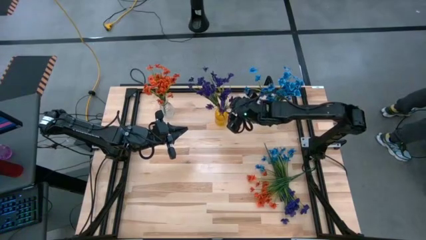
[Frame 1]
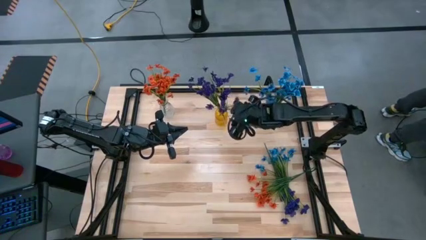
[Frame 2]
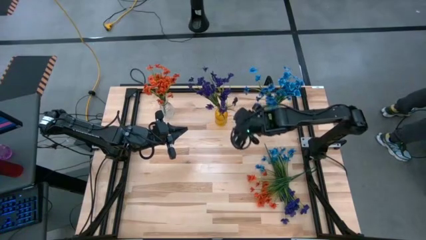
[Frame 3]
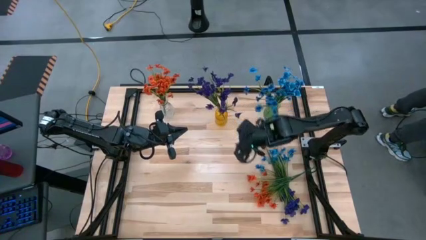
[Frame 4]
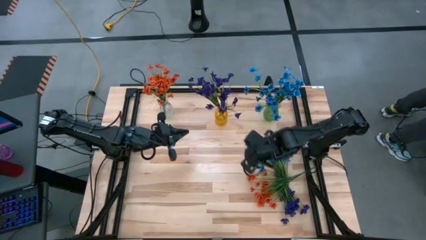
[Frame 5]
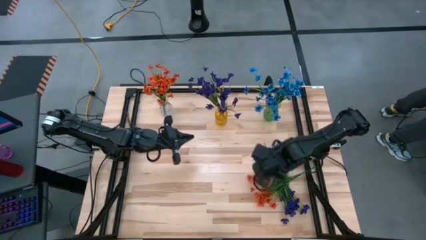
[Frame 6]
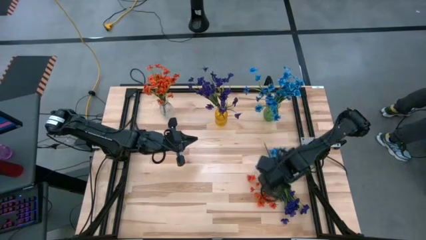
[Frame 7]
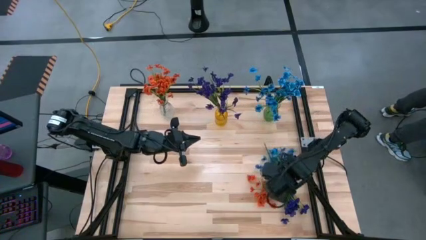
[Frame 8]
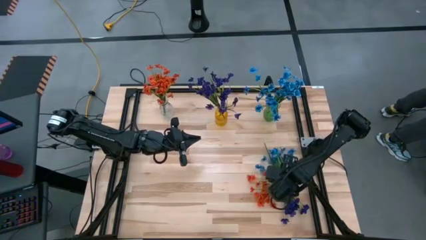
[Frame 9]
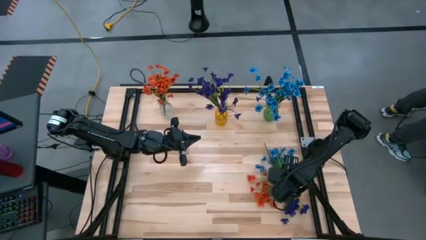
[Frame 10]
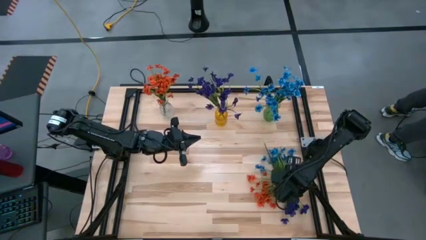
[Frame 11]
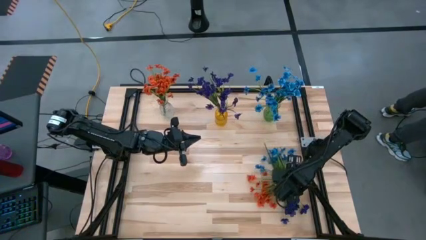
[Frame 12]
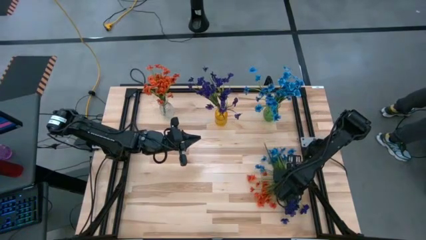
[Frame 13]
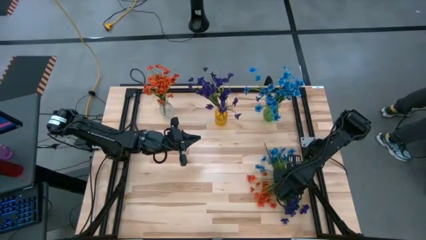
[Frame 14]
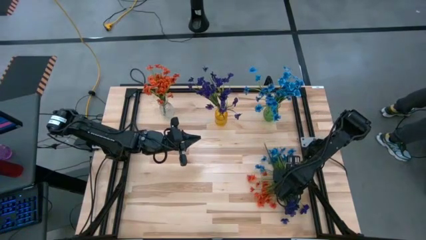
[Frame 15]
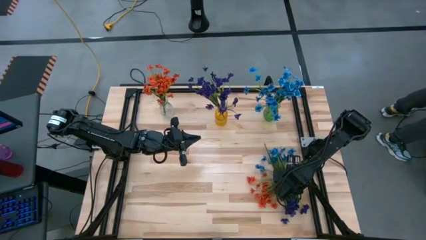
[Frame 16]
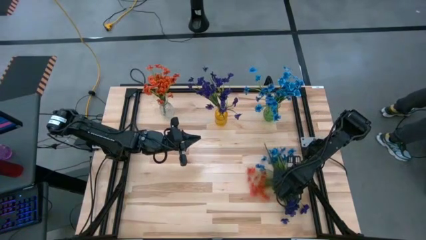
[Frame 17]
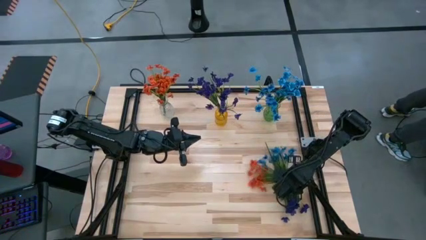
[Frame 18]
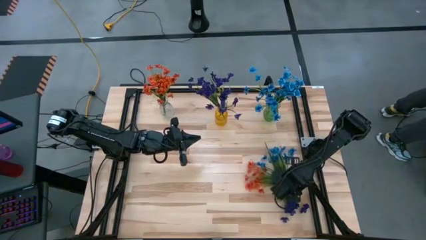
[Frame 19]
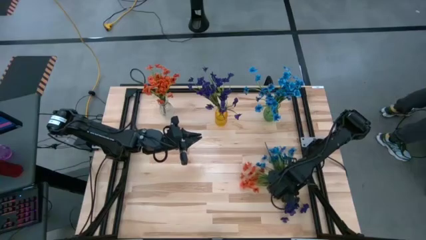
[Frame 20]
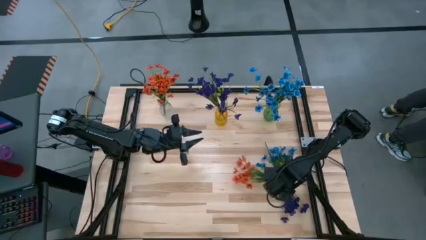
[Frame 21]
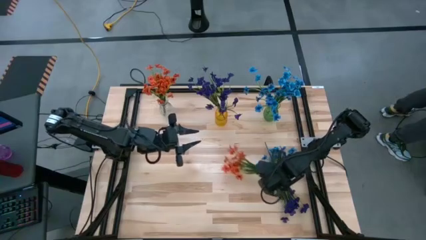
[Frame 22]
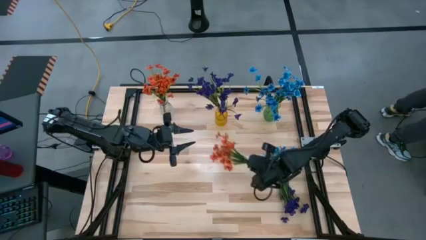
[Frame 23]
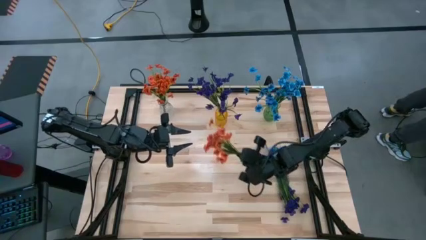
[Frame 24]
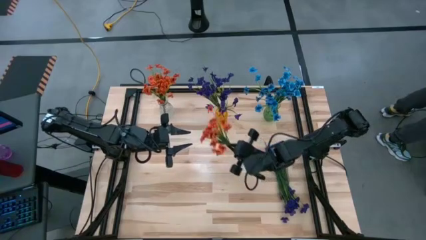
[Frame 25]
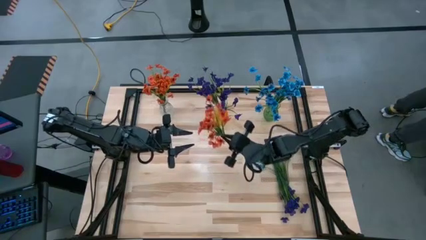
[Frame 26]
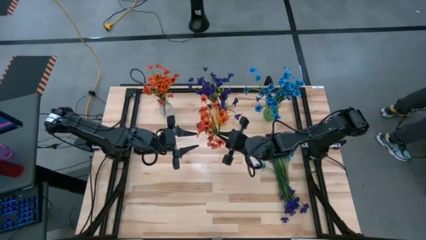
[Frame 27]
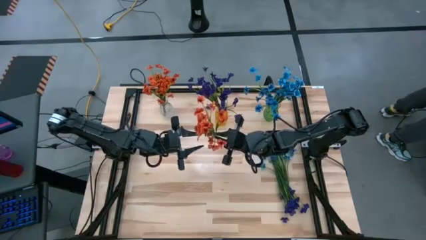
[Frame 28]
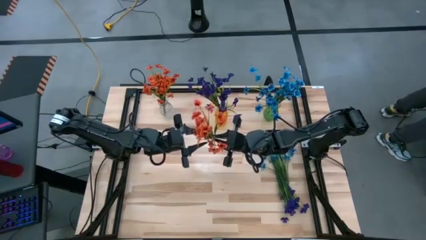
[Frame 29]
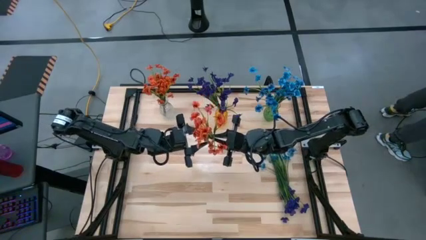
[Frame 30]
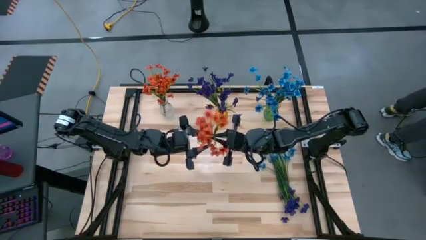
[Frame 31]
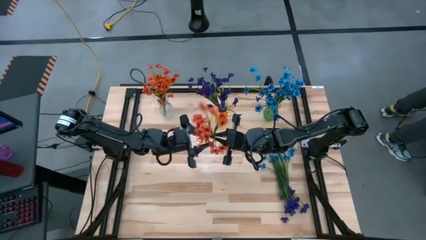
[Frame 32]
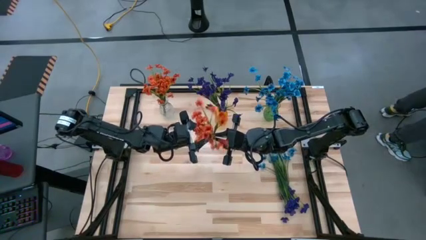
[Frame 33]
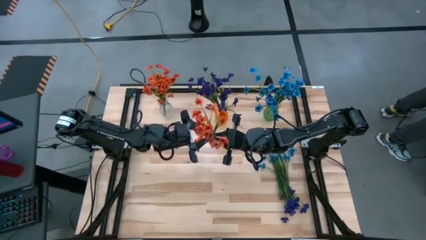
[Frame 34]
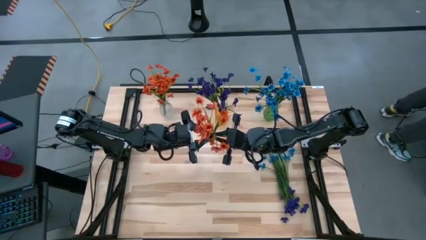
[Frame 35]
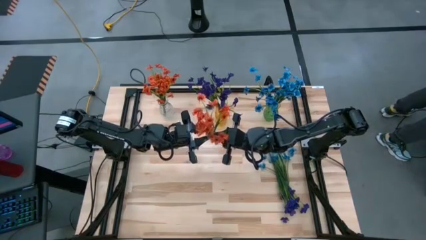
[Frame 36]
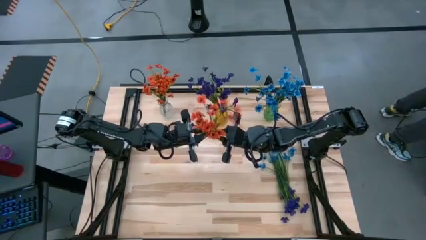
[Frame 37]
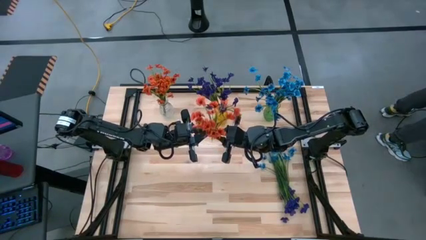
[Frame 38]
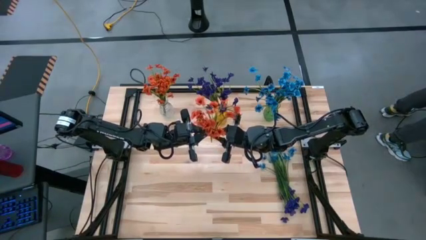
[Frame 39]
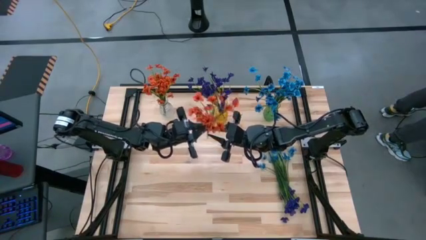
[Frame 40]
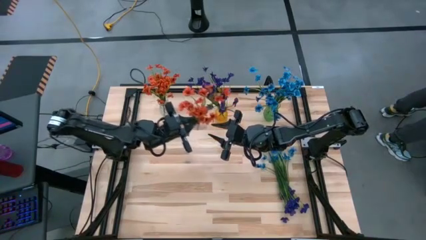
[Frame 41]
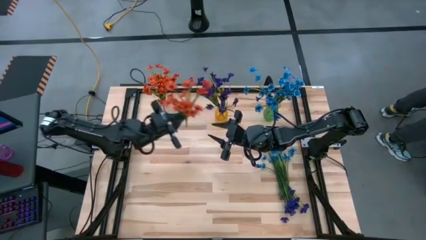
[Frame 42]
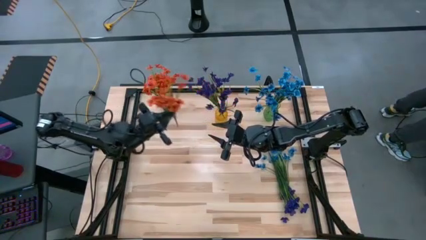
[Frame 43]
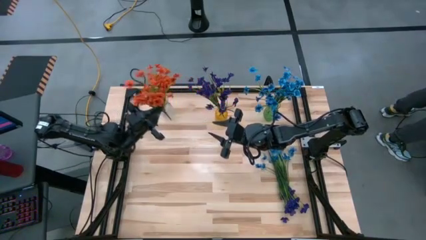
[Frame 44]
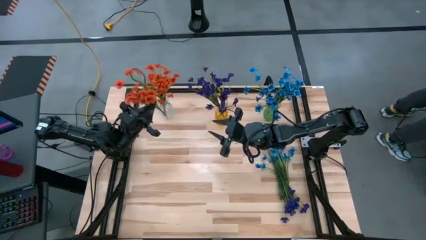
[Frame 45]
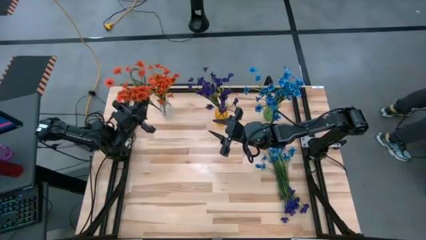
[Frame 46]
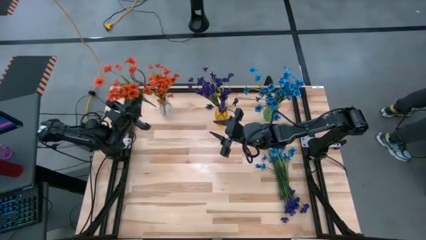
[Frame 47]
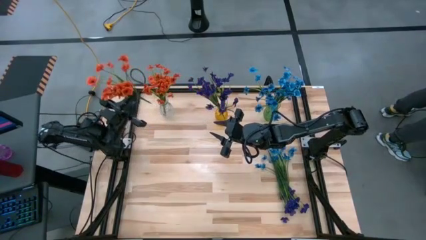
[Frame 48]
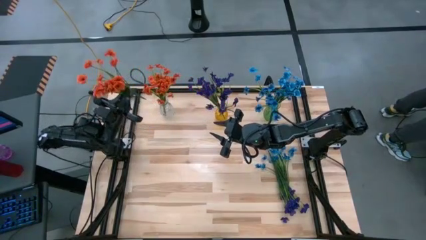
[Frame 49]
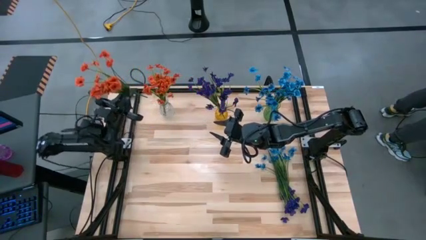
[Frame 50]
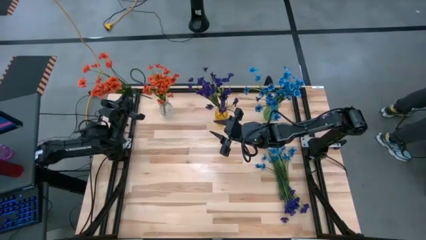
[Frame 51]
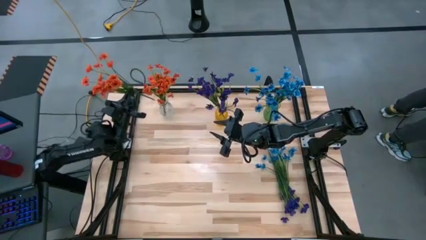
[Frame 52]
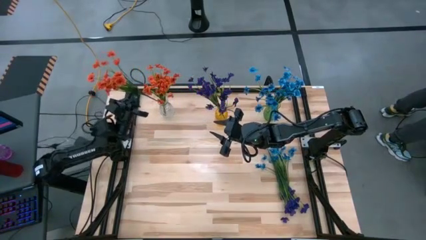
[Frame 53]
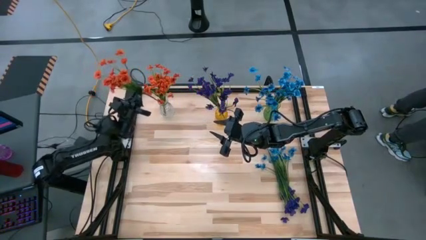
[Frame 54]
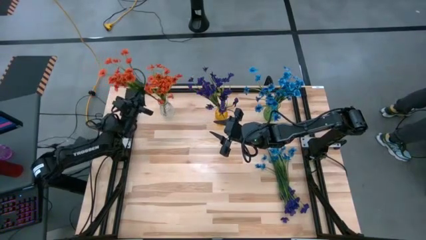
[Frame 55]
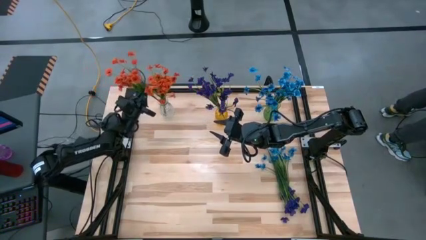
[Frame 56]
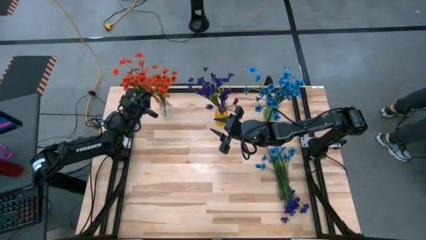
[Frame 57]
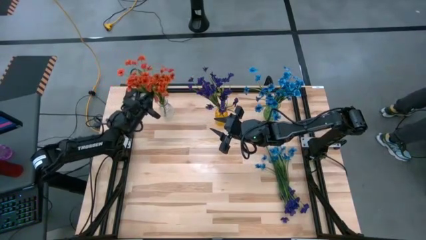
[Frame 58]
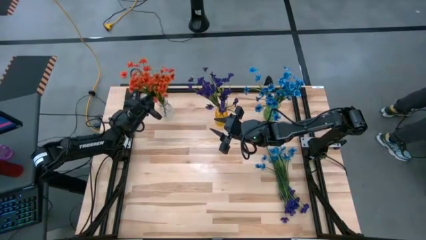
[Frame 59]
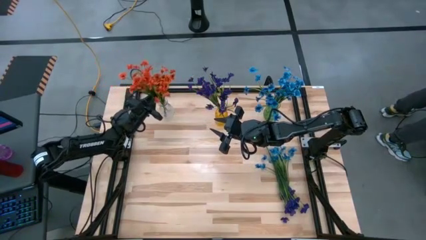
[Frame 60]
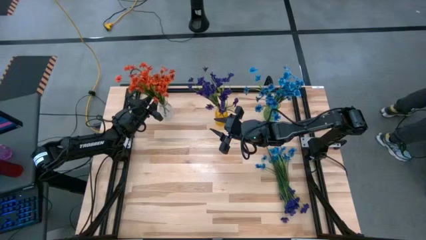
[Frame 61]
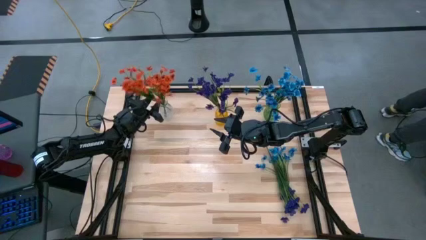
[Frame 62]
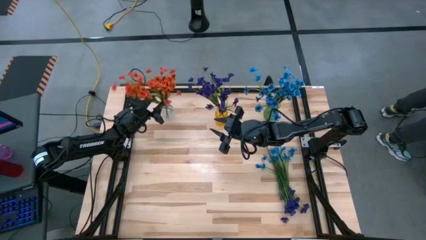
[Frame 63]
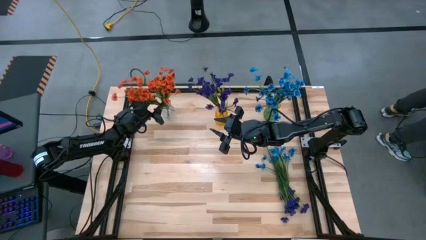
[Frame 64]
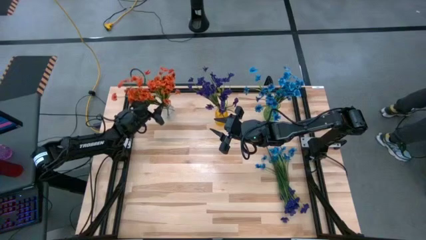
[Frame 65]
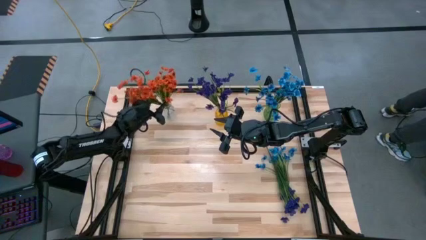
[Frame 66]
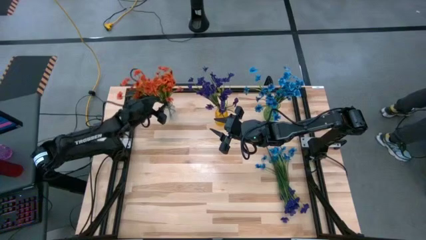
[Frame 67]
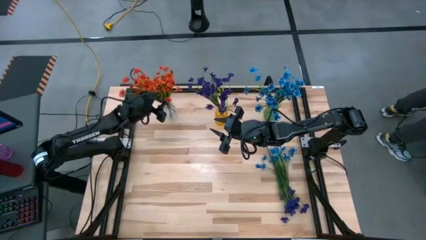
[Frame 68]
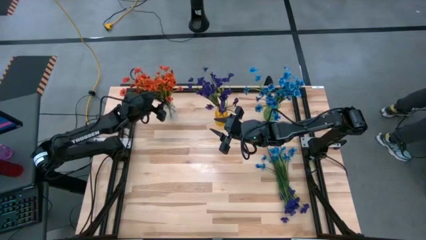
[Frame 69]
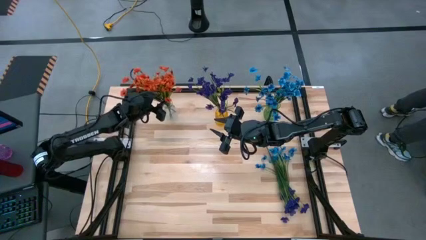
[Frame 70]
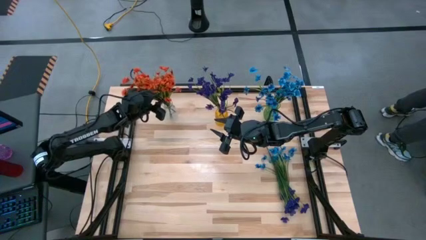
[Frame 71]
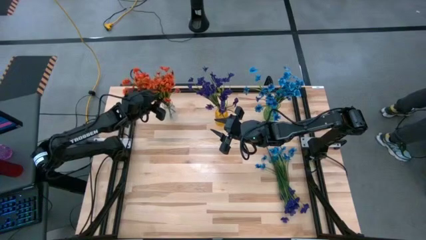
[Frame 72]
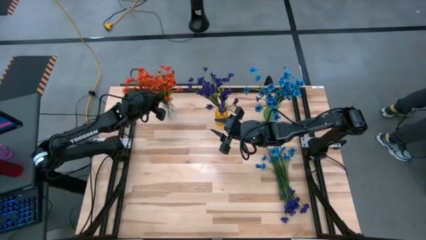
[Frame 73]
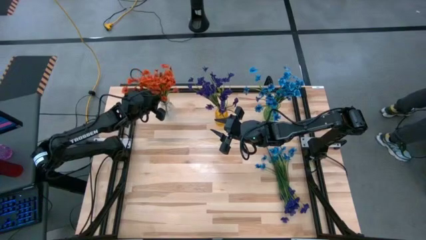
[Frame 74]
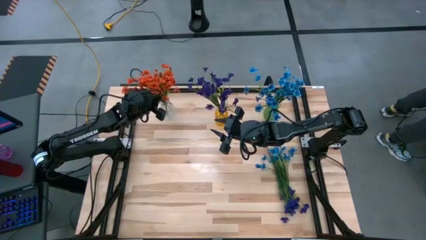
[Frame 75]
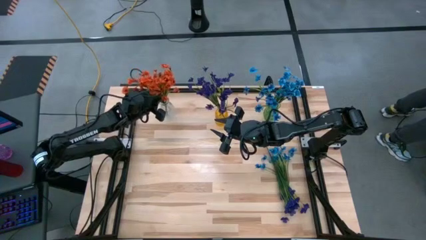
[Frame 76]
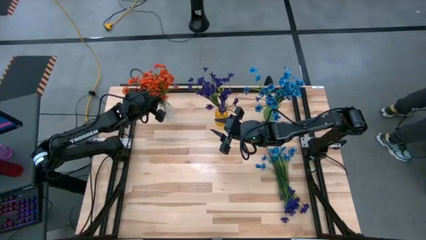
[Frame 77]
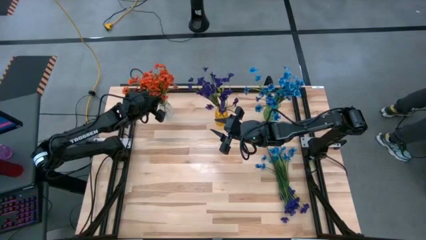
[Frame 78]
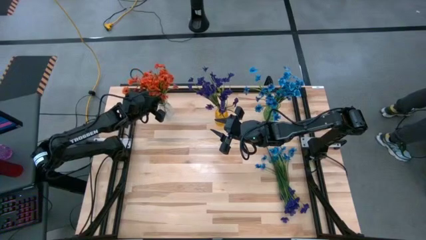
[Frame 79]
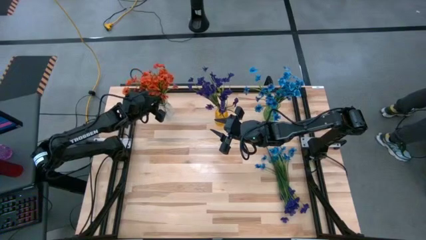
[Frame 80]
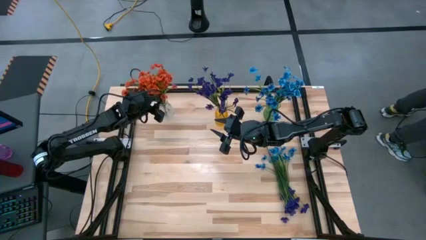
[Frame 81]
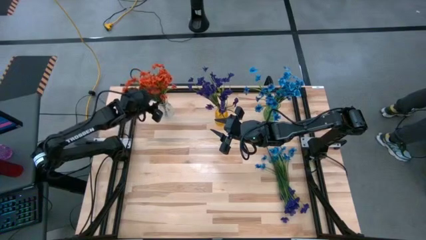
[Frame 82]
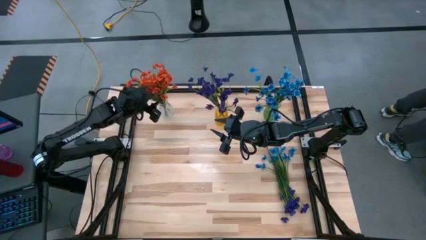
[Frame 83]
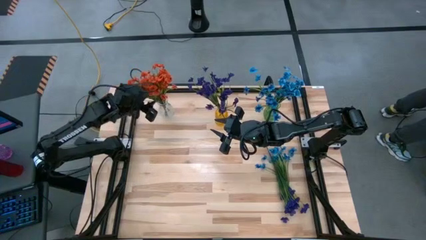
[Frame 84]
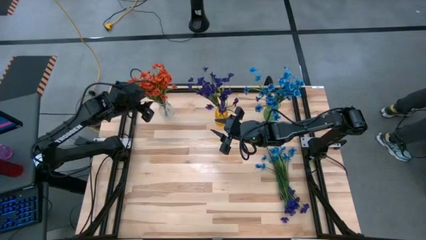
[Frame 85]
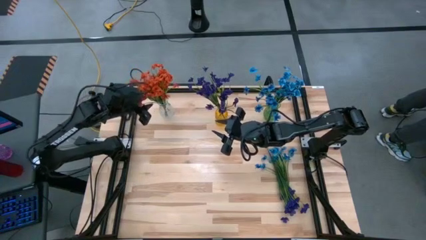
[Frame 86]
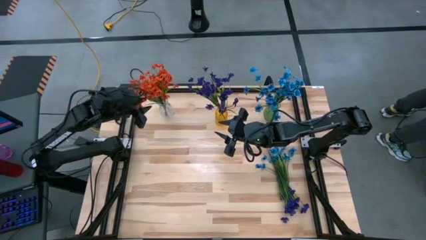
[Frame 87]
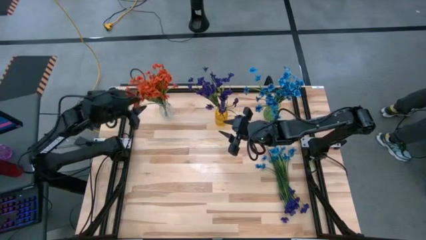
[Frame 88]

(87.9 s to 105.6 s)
Task: Sort flowers into vase by color
Put the orange flower into the transparent vase
